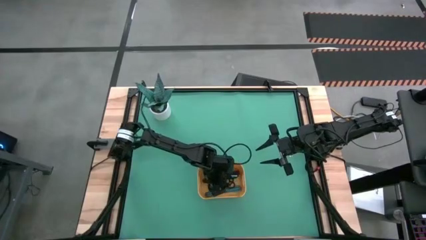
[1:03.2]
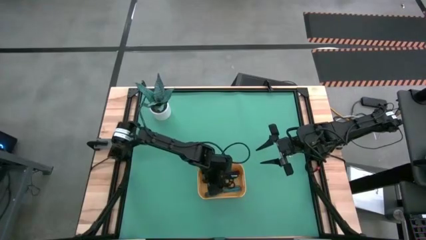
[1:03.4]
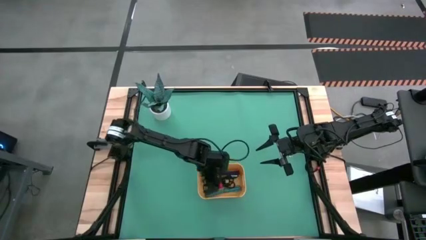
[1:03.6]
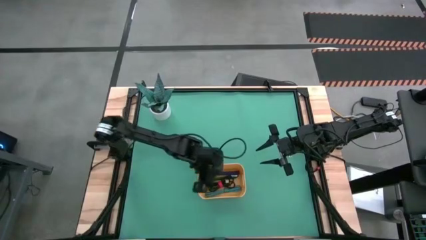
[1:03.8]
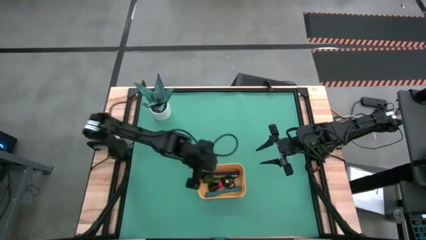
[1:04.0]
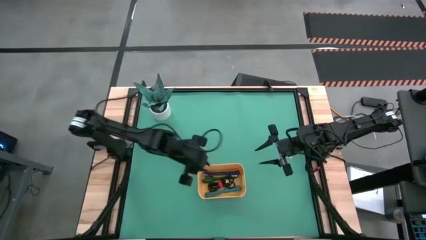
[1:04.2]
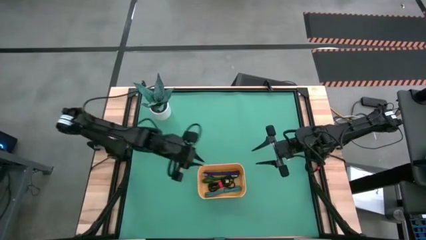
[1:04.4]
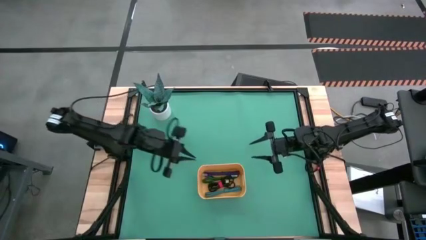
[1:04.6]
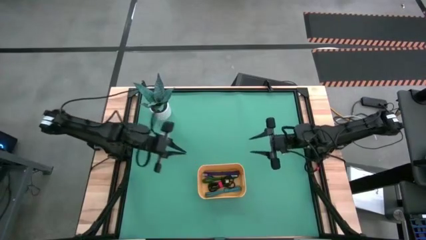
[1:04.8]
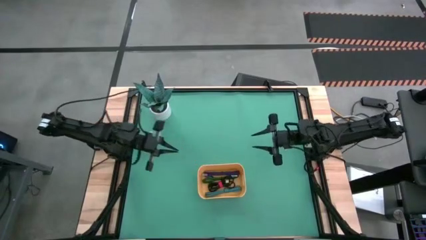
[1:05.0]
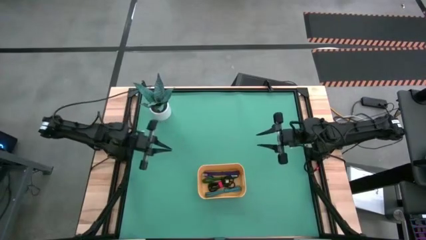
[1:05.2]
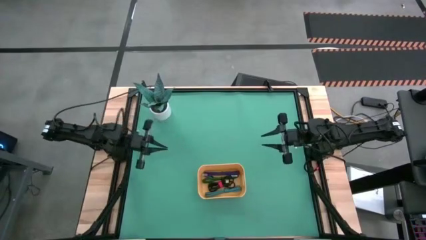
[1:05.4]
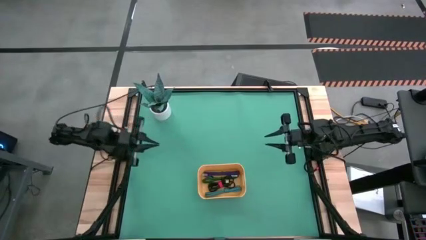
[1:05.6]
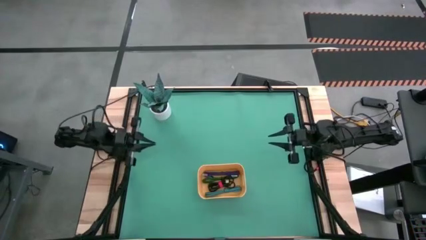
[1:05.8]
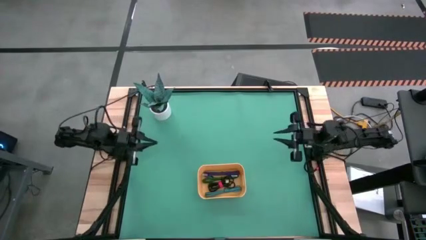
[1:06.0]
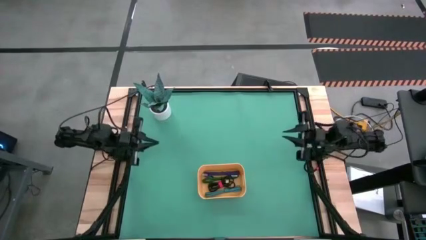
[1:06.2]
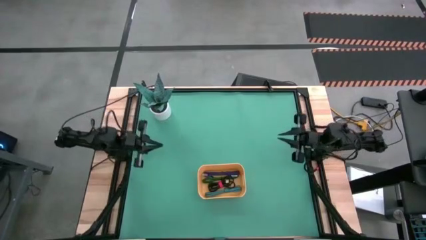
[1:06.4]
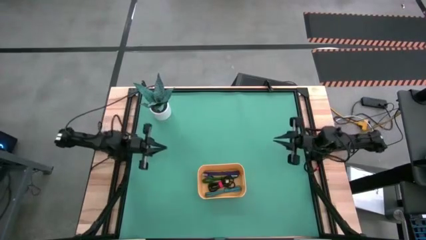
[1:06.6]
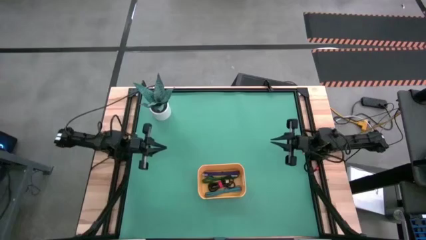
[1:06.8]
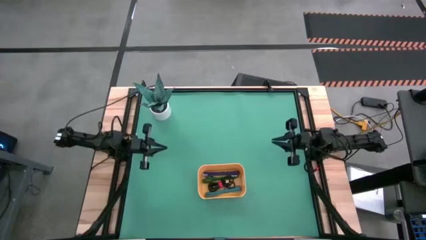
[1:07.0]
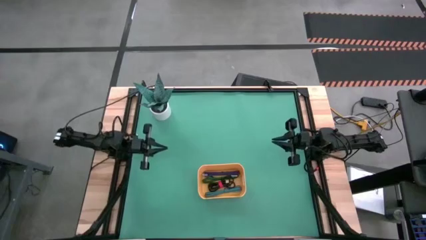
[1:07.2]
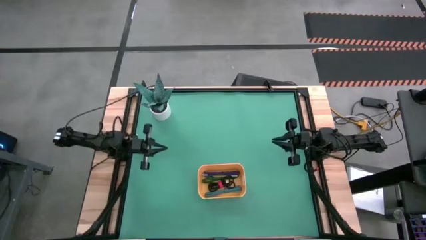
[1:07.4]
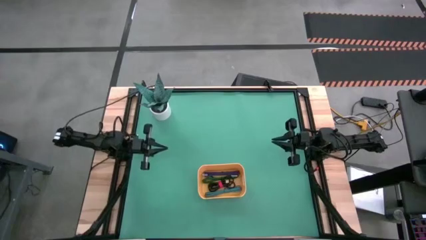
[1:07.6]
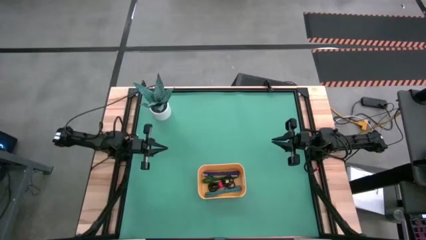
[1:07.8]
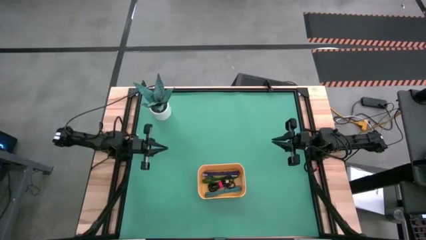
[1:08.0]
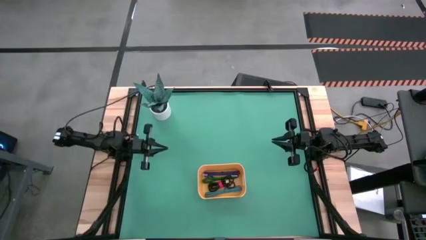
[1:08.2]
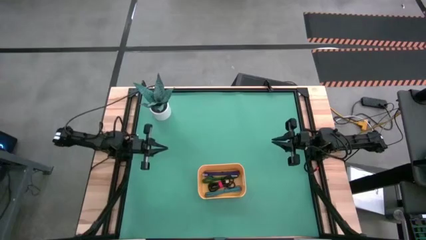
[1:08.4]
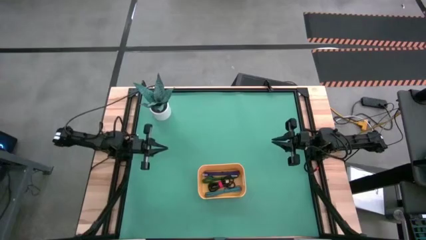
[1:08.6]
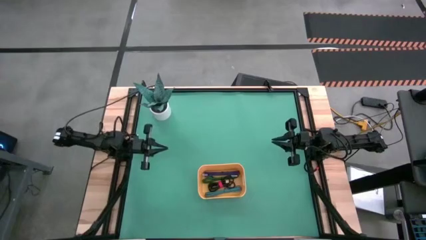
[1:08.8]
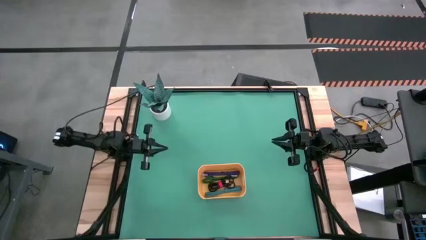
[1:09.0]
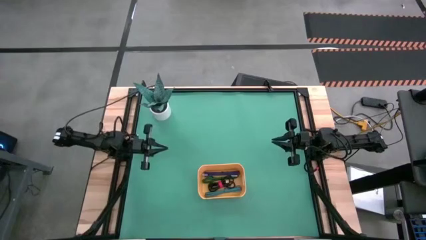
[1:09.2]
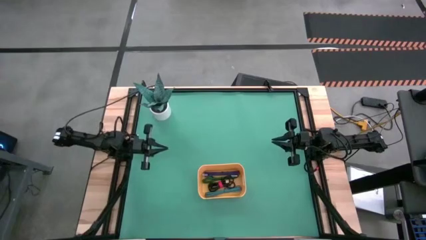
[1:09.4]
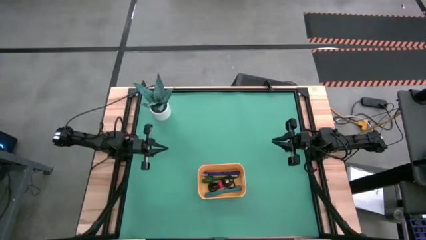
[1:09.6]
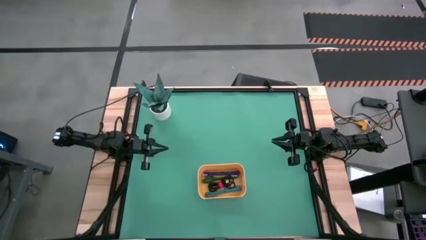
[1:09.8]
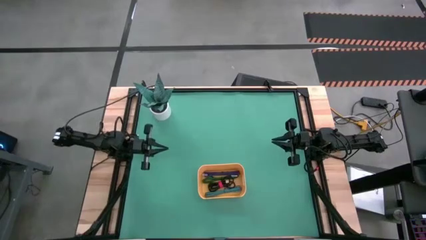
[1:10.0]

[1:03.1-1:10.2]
Task: Pick and place USB-C Cables
Return to home position

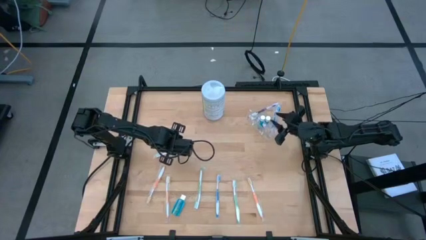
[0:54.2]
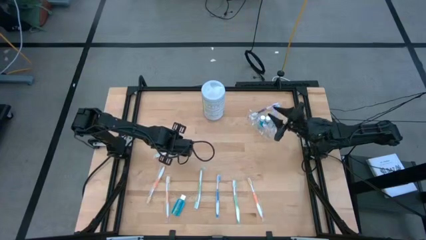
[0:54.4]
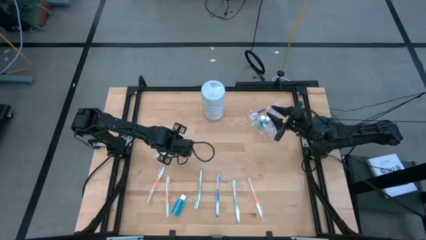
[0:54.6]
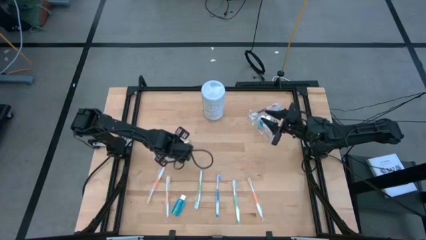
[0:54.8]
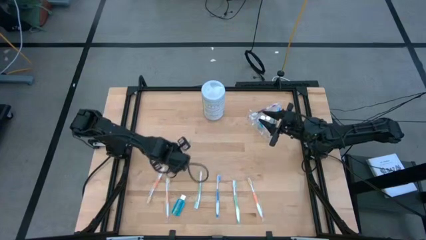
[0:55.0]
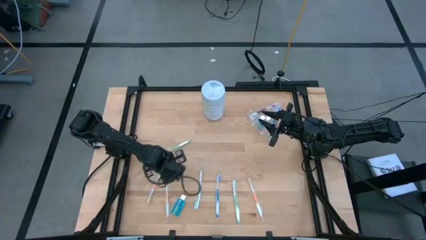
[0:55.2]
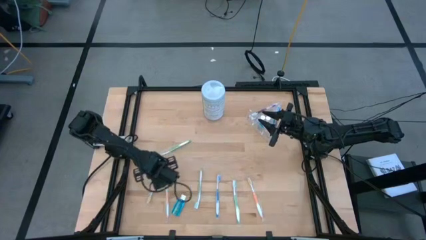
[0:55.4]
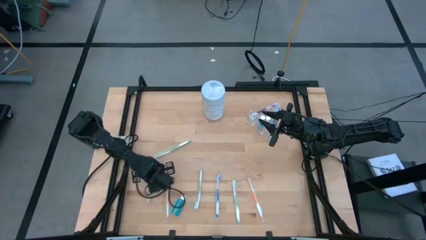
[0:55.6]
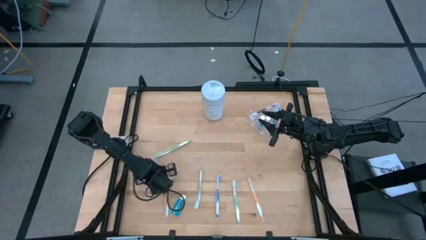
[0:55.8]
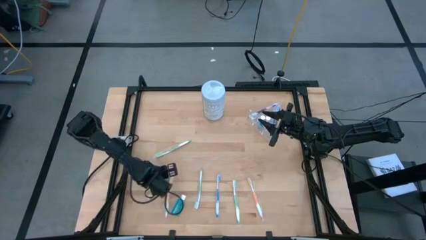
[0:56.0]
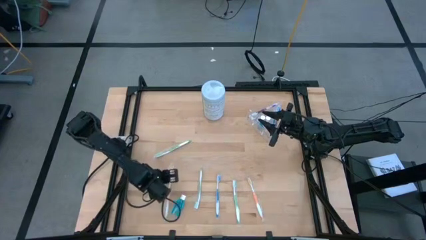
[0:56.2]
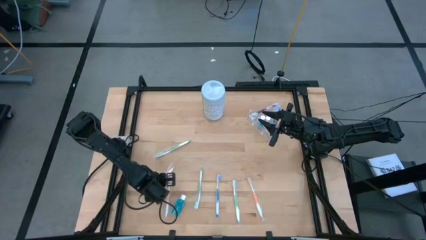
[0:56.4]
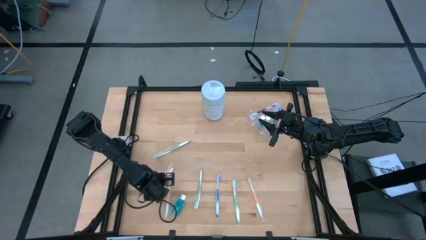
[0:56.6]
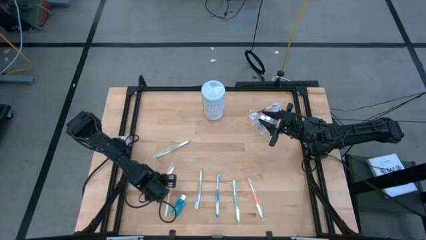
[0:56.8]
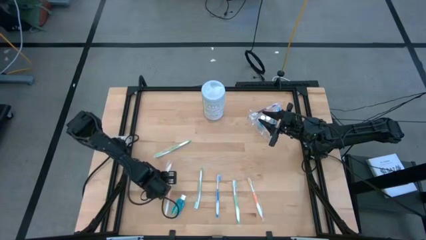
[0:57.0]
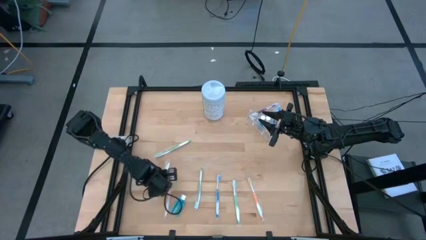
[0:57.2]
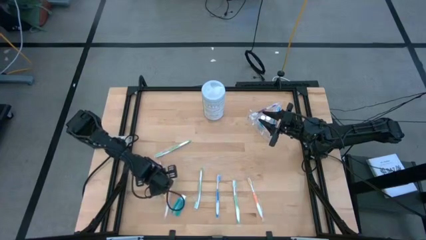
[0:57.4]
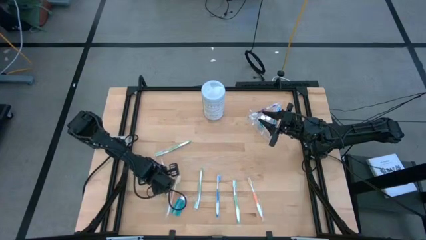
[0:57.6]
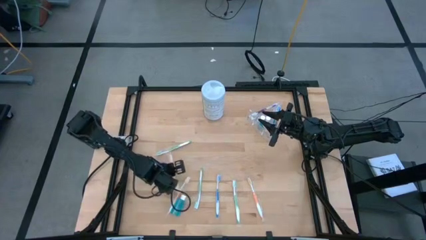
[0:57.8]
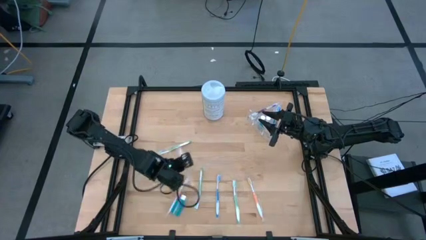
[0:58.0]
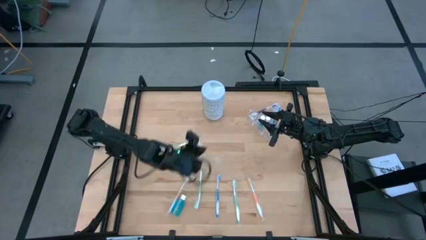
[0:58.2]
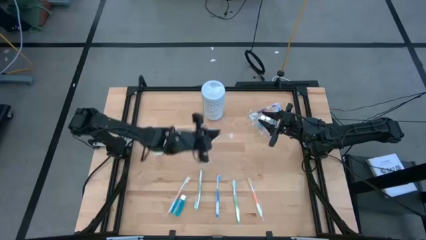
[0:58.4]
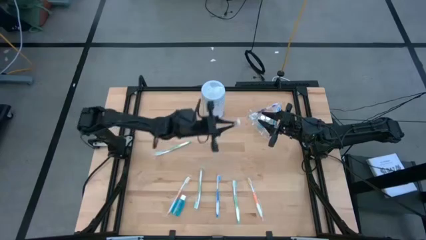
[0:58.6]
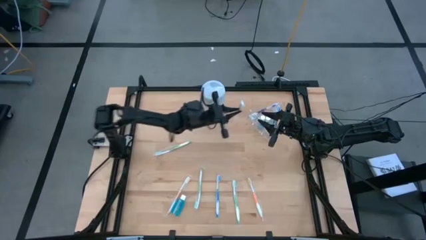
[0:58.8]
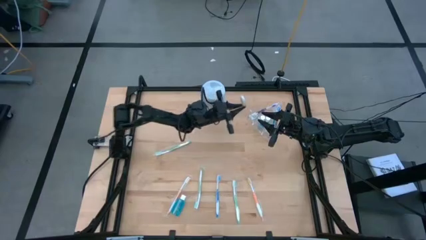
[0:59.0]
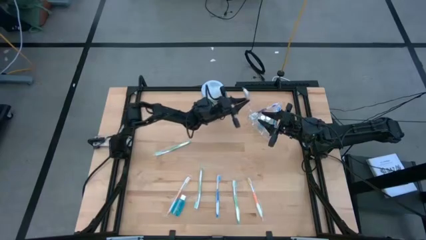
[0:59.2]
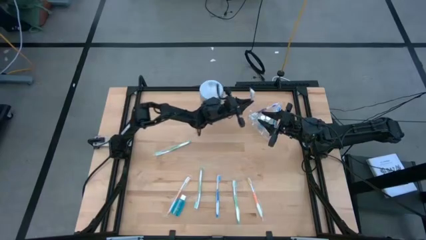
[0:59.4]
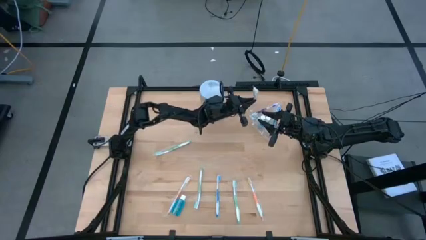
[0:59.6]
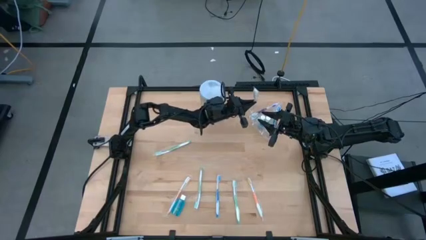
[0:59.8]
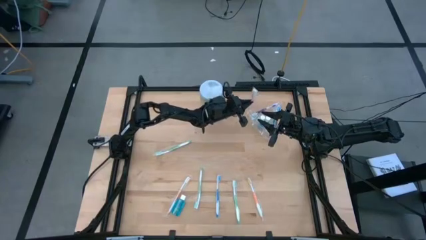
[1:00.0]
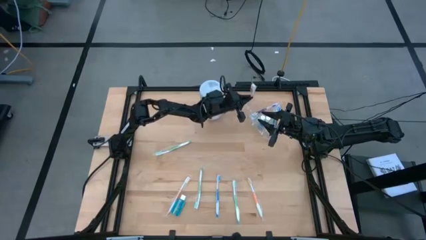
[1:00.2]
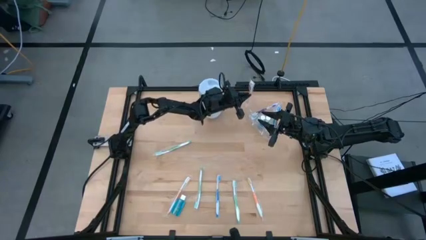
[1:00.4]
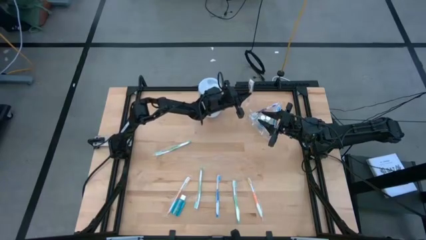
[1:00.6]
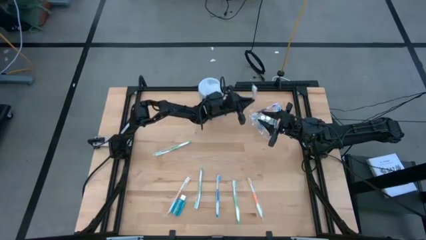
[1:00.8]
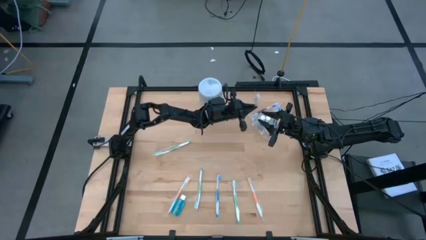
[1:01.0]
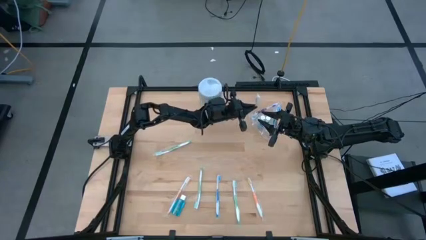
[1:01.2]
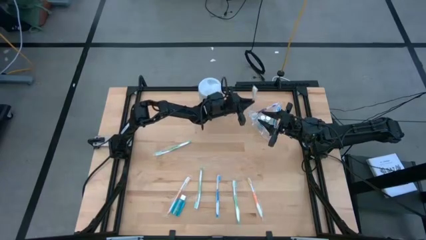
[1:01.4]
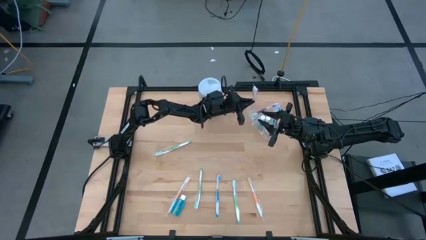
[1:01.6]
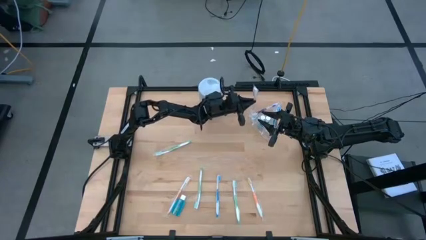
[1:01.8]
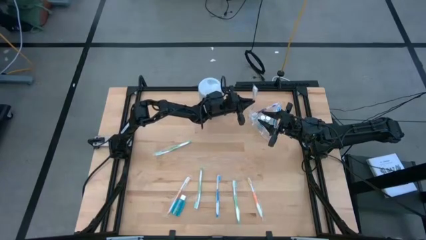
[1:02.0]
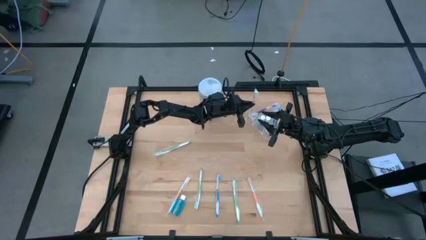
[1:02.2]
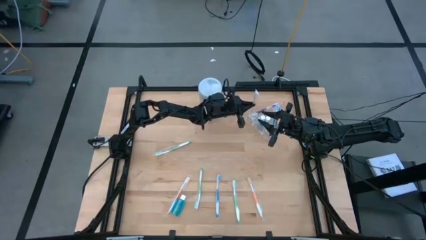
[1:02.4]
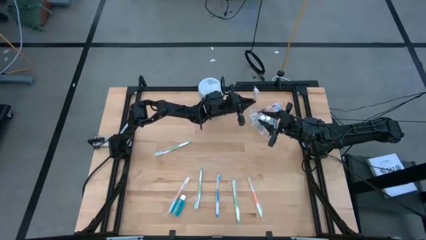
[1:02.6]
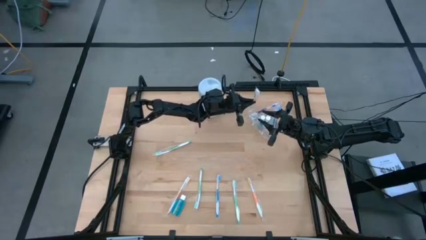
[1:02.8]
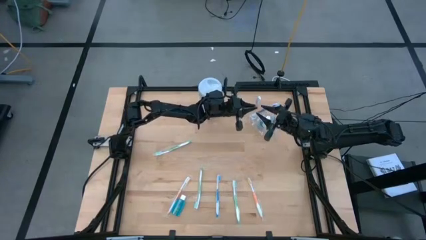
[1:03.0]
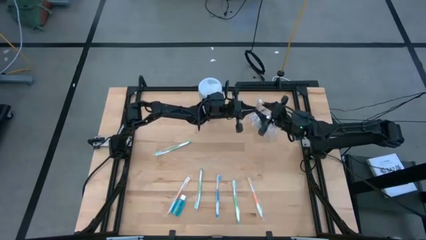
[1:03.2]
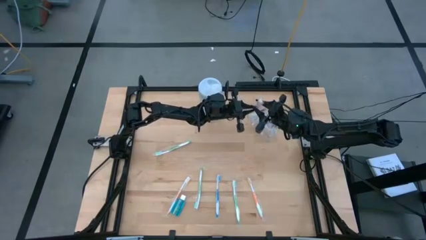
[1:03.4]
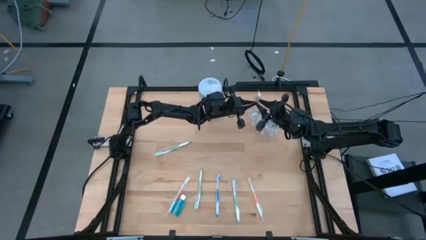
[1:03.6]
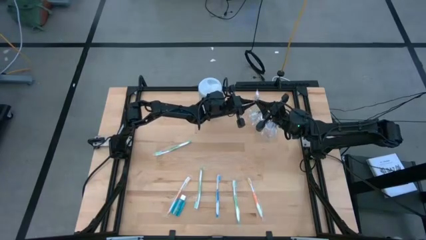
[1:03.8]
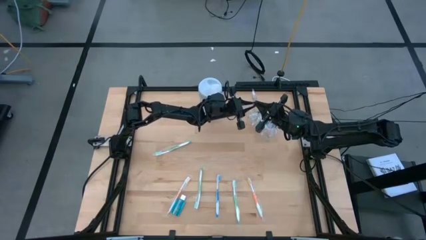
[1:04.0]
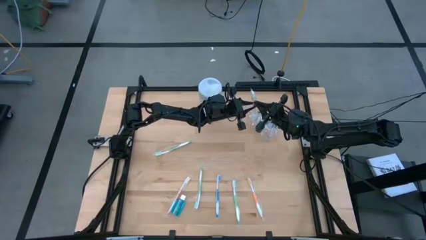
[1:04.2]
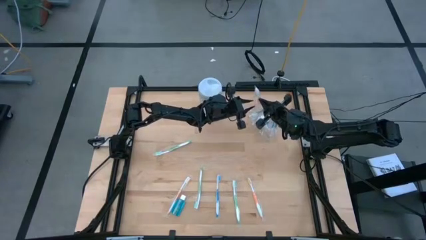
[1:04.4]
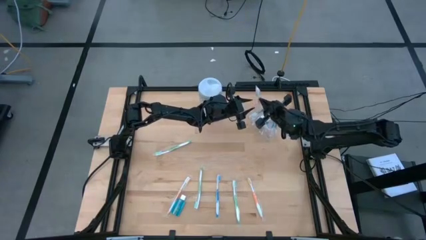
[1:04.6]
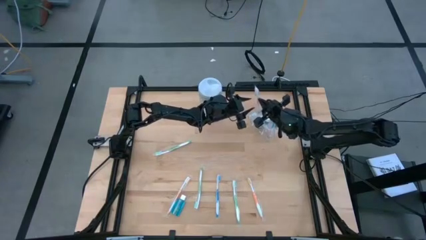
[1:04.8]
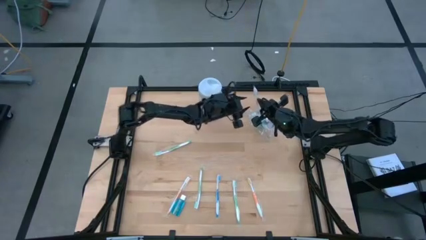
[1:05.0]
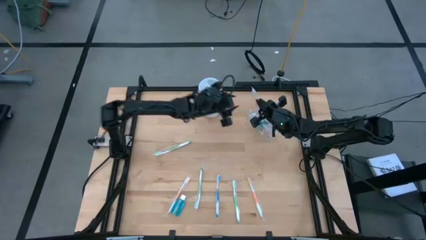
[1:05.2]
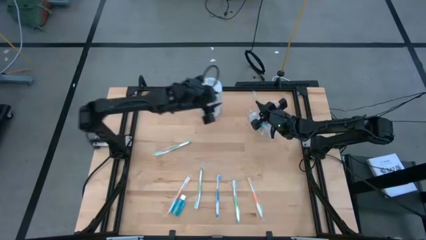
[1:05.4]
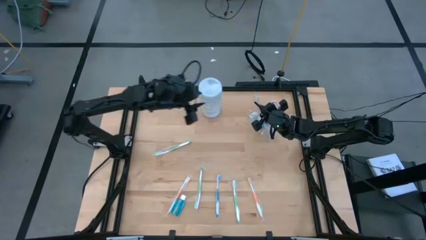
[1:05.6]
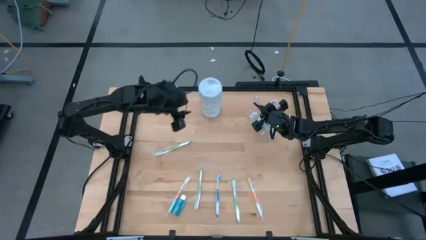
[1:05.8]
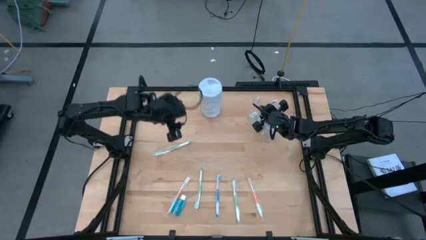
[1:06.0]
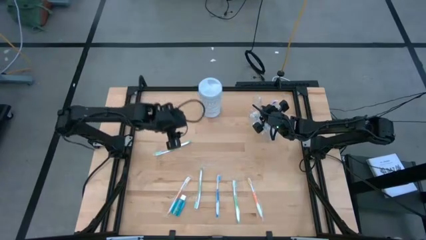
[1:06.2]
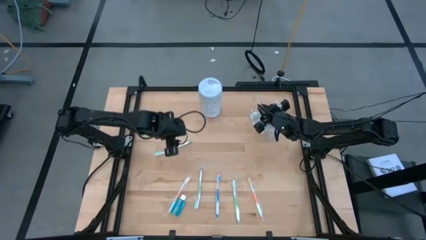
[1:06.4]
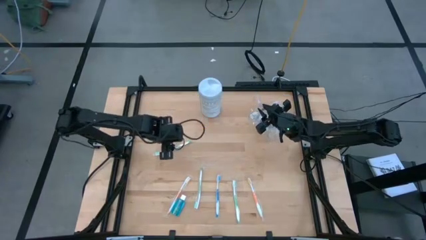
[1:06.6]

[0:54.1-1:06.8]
Task: Pick & Place toothbrushing station
Put the orange toothbrush into the transparent organizer
